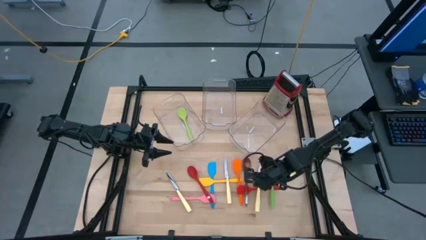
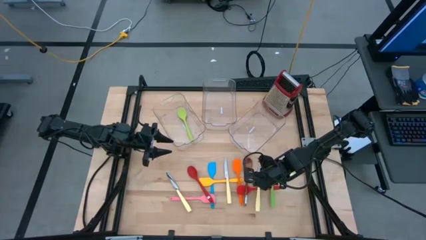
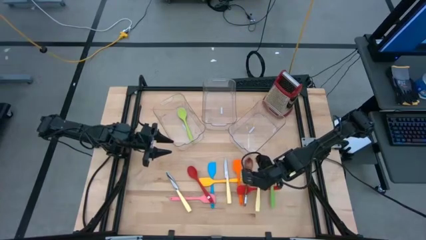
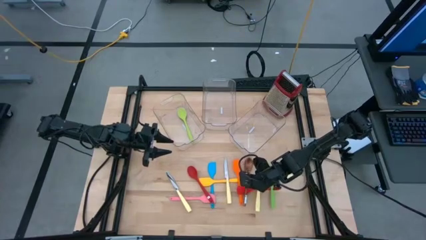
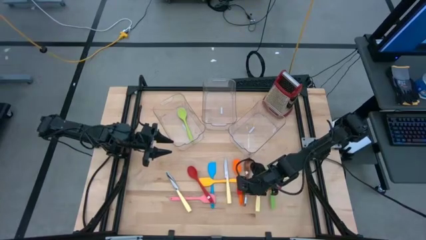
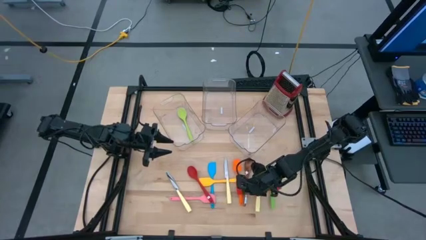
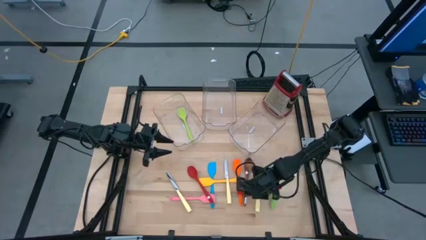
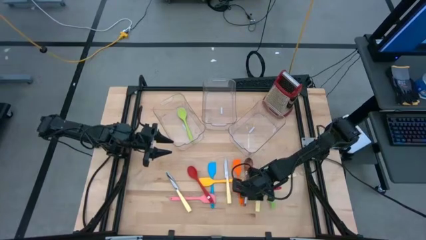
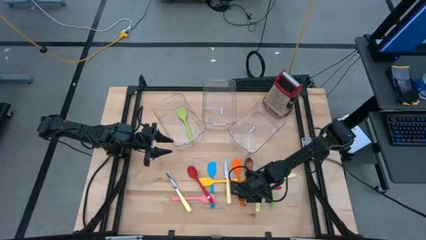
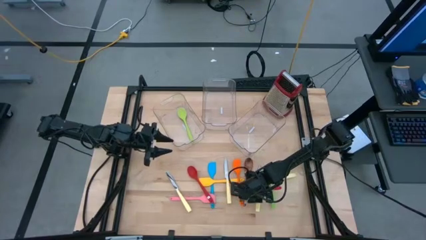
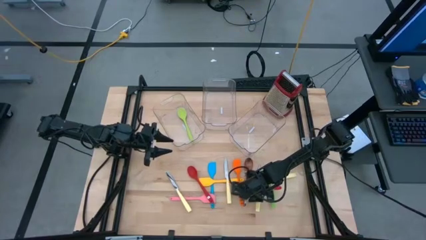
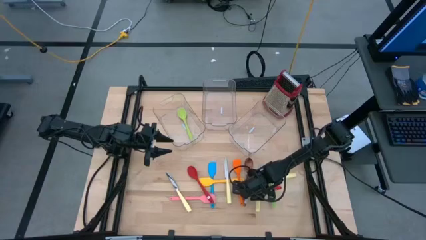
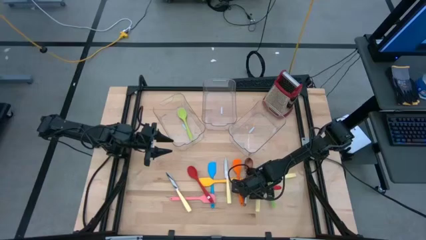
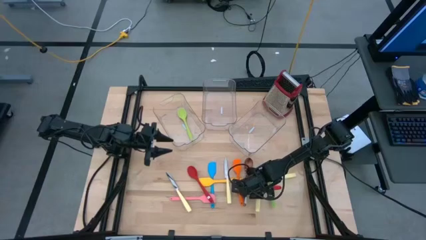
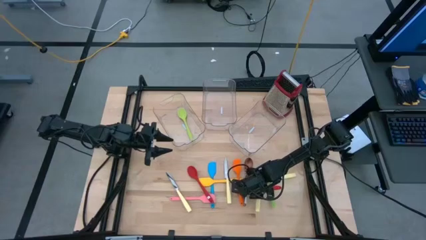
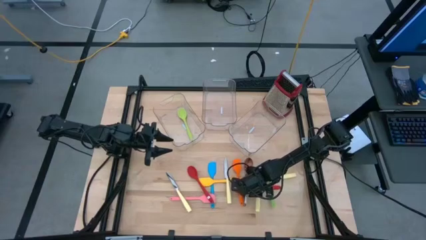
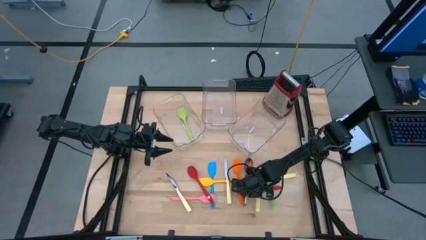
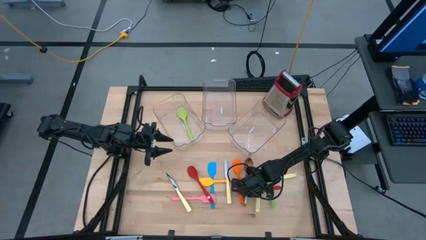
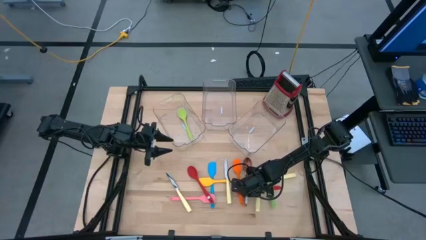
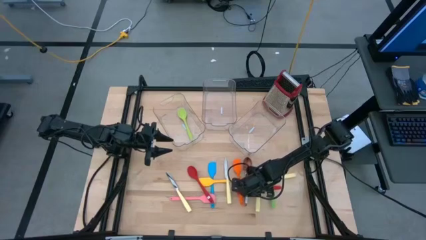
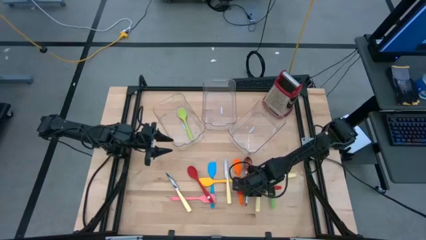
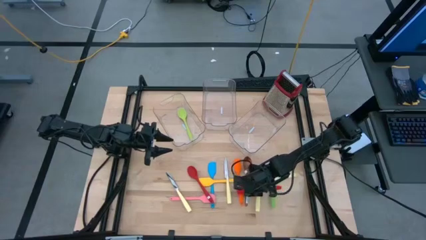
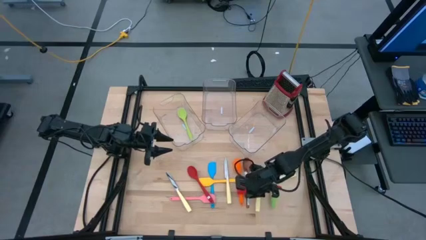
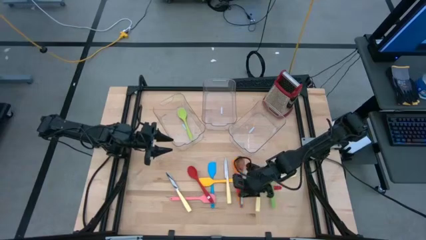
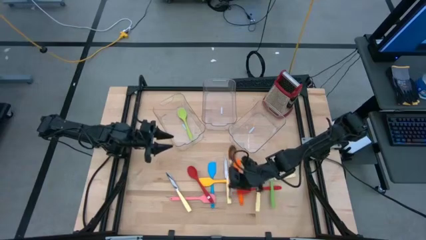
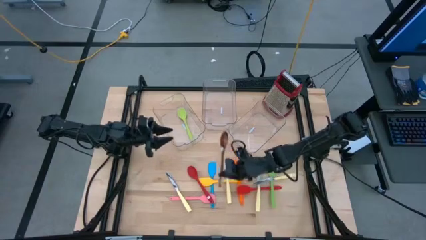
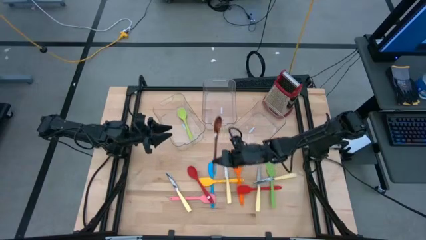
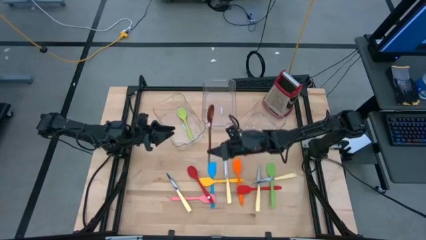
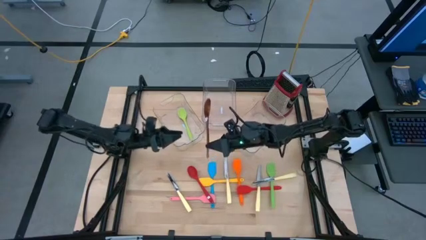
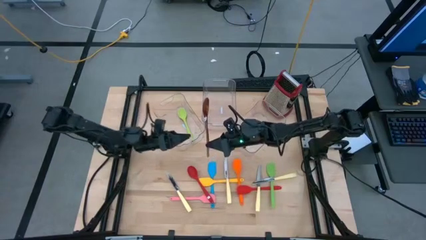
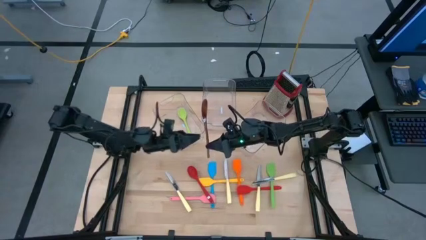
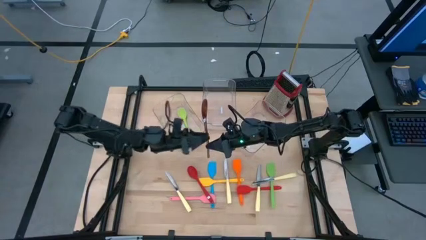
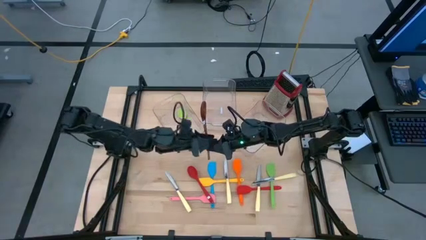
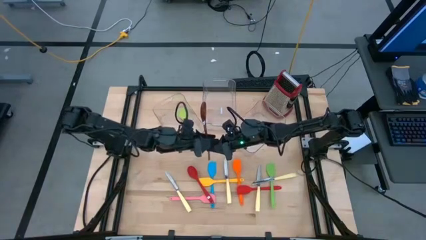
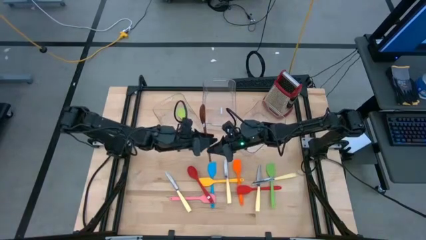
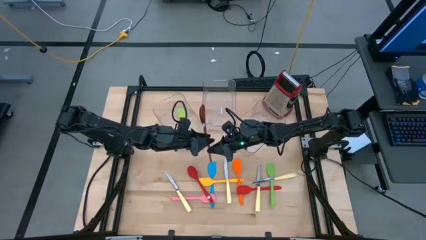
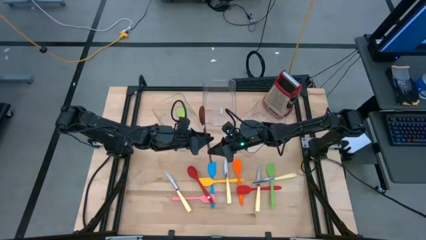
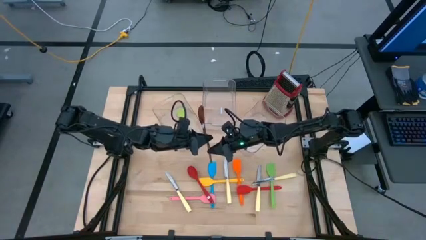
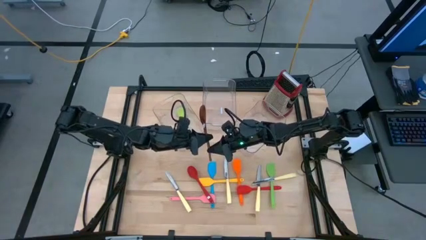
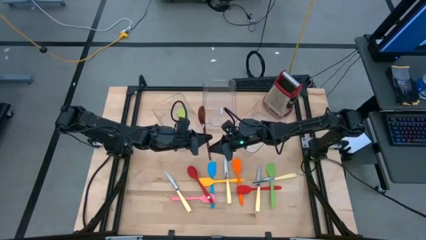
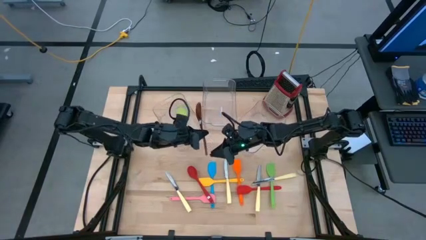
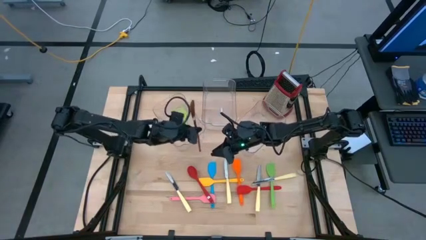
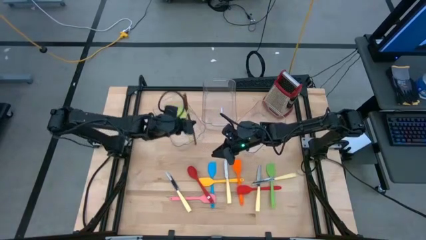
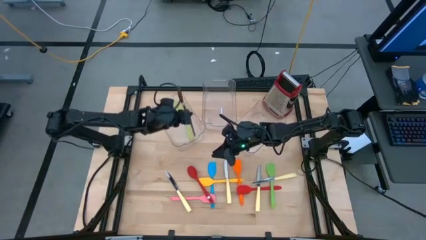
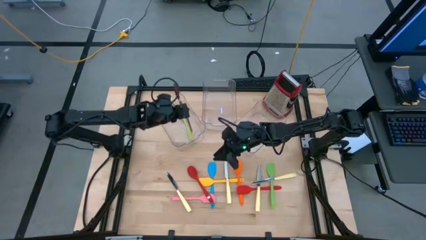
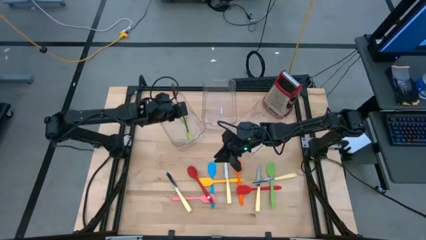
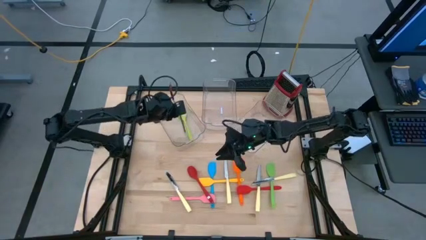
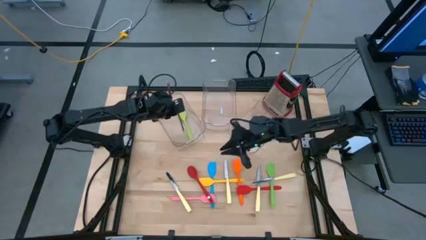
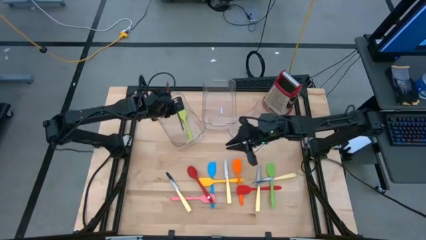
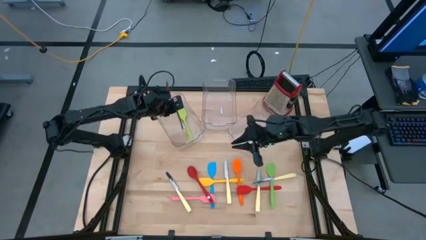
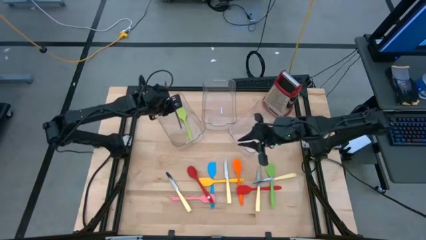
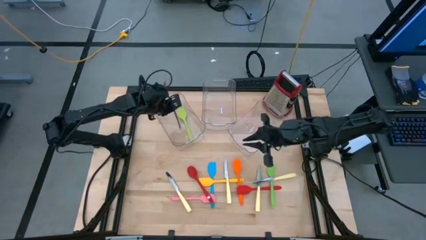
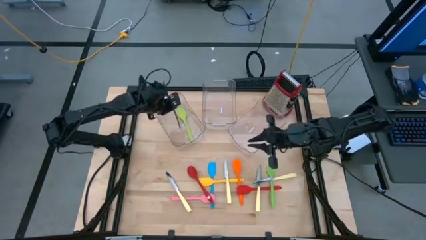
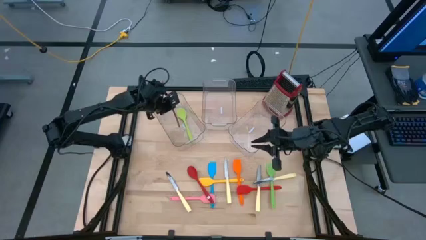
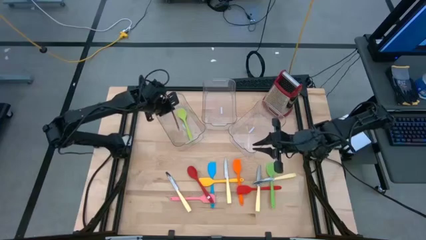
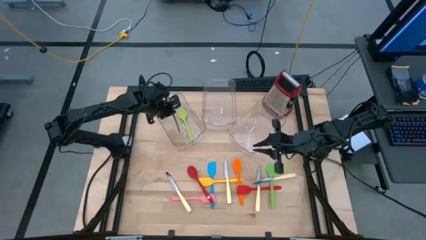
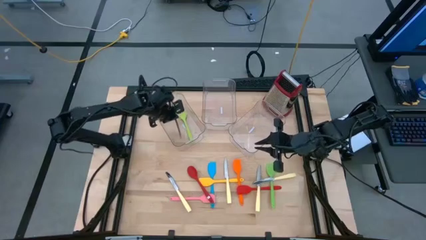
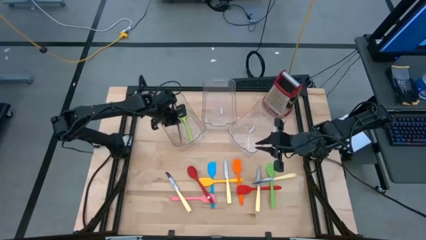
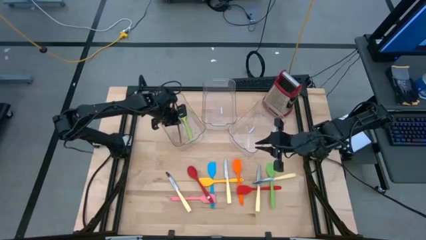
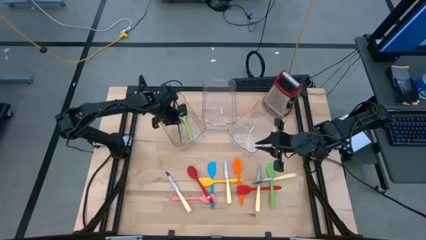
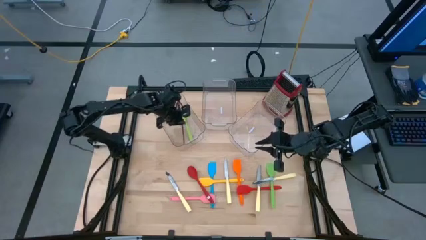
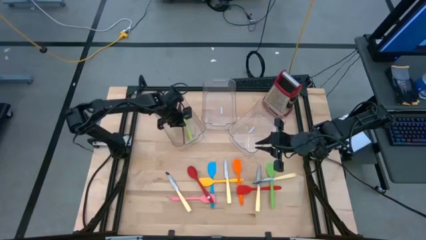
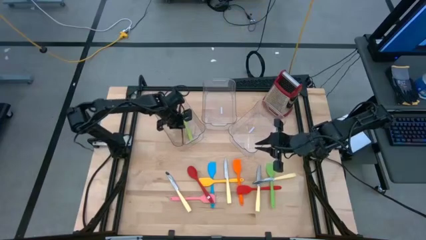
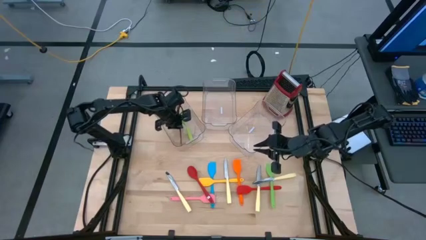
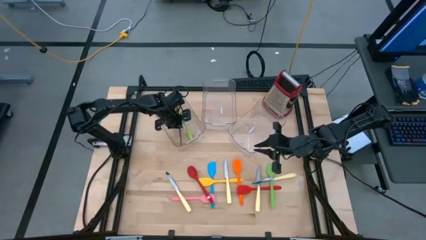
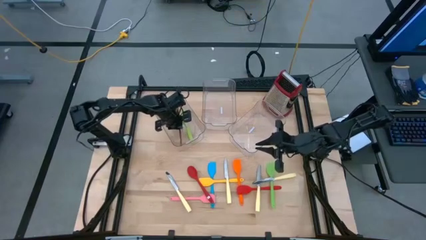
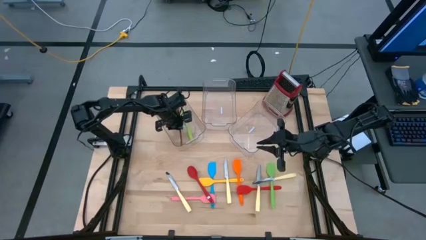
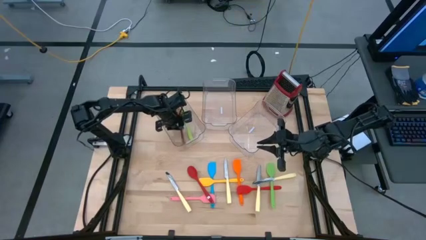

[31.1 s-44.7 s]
Task: Pick & Place Kitchen Items
Put the brown serving spoon into the left transparent bin

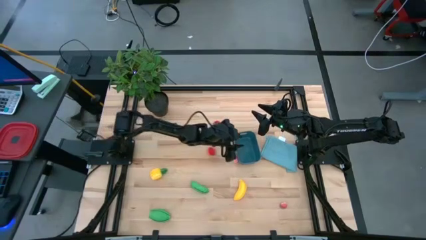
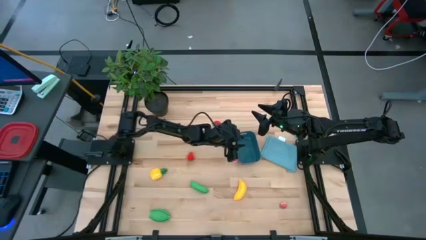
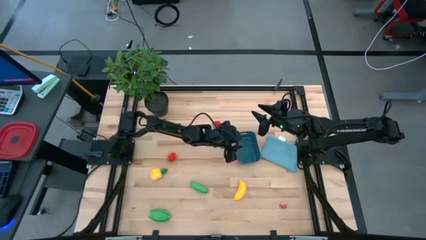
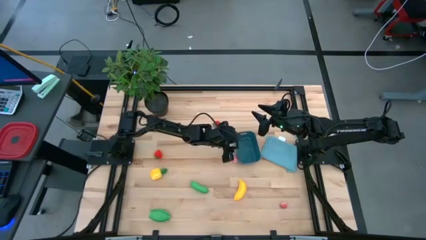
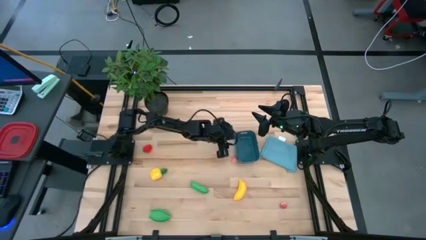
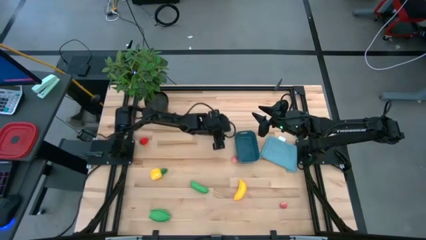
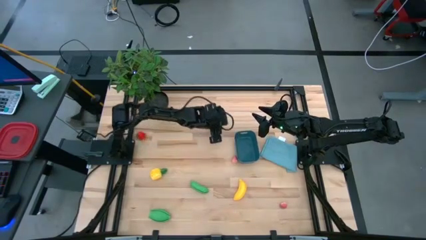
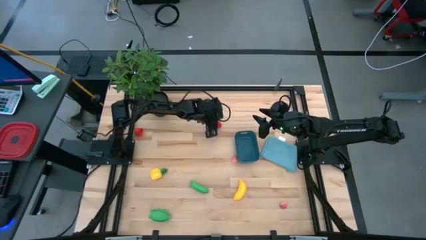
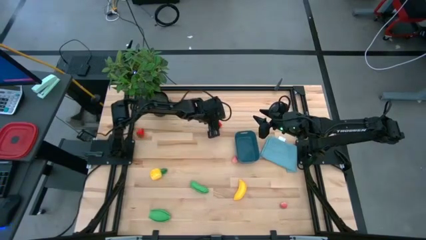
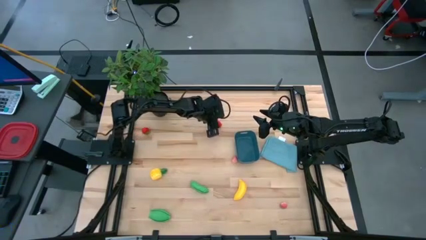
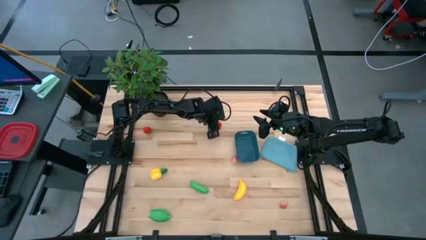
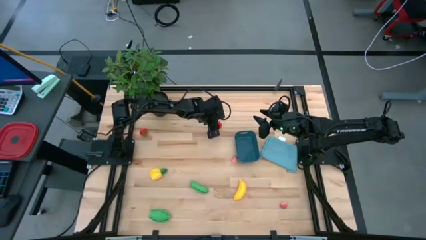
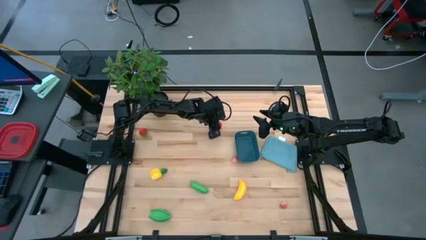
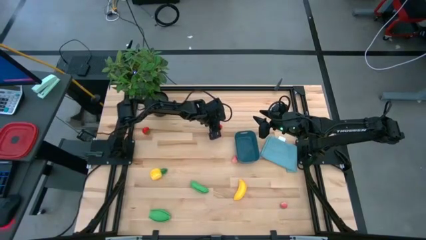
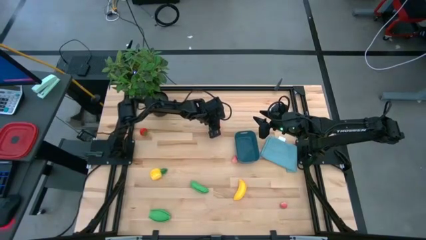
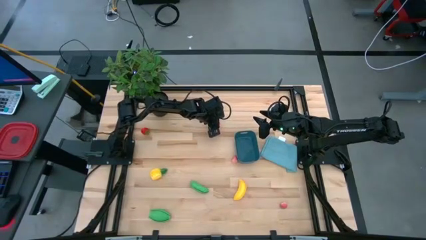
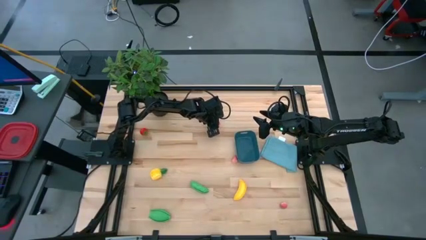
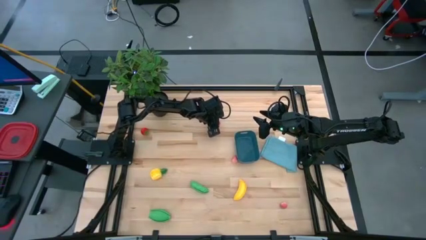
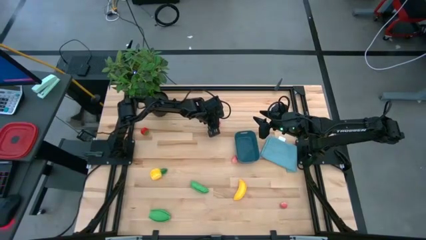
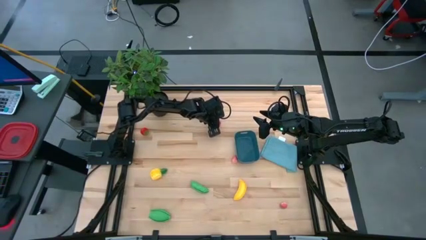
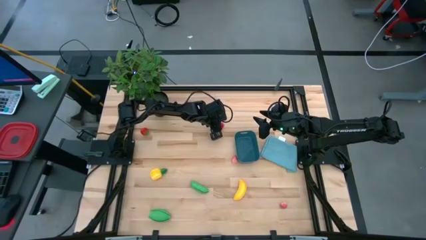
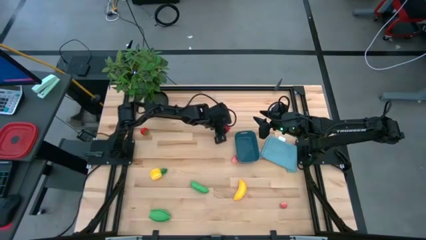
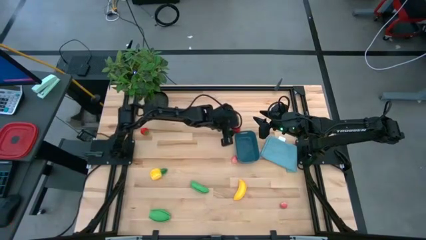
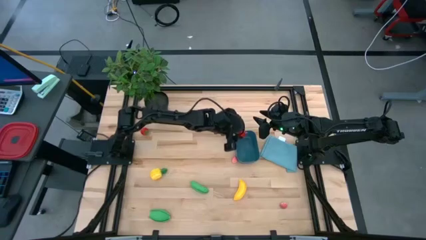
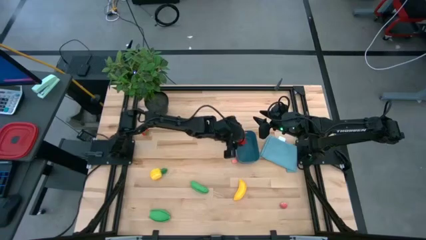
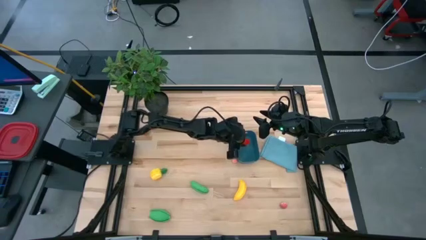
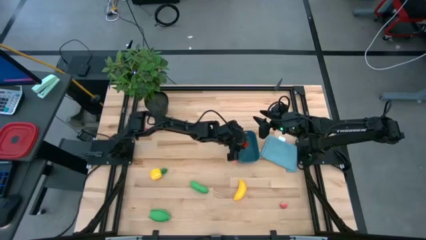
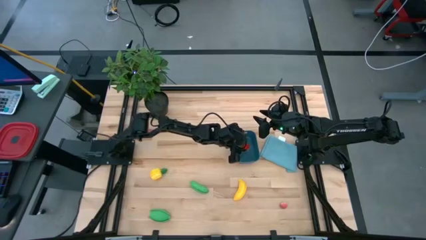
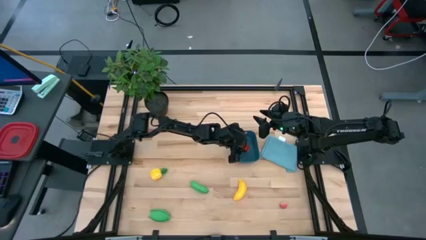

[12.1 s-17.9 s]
Task: Pick and placing Produce into tupperware
Put the left red strawberry into the blue bin
